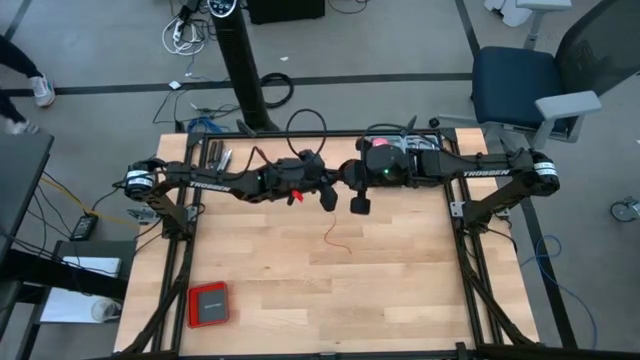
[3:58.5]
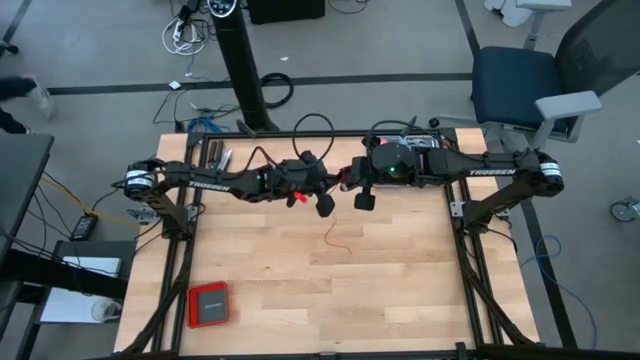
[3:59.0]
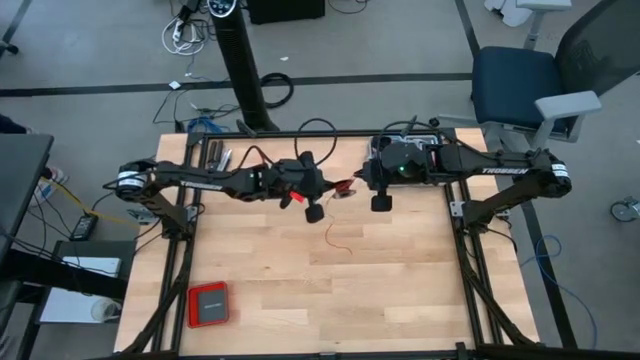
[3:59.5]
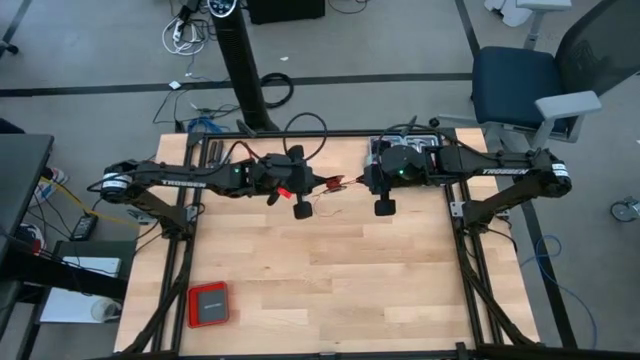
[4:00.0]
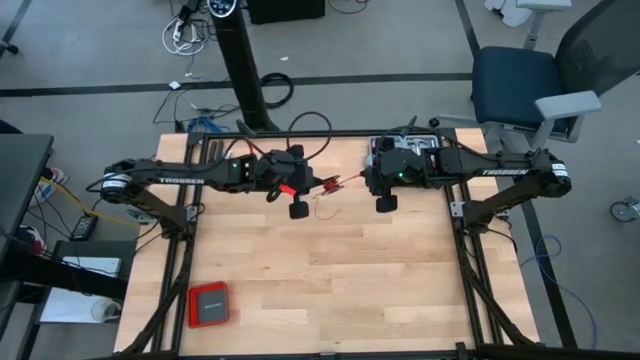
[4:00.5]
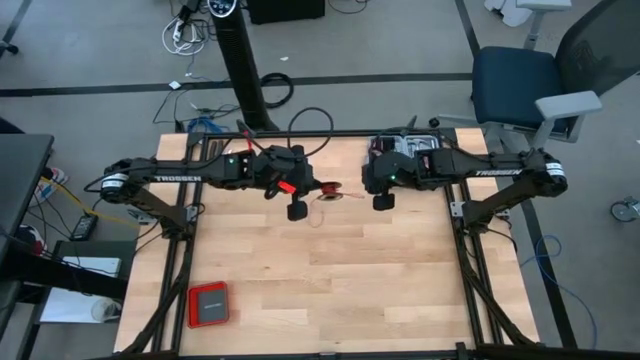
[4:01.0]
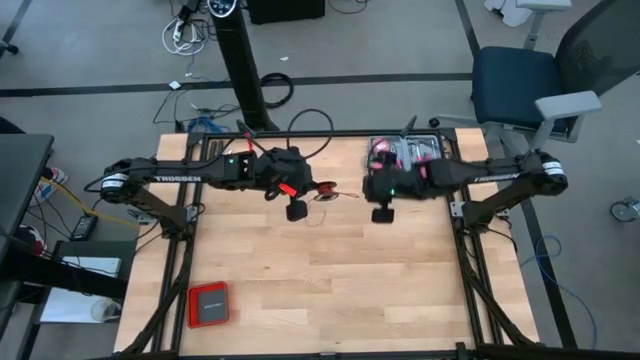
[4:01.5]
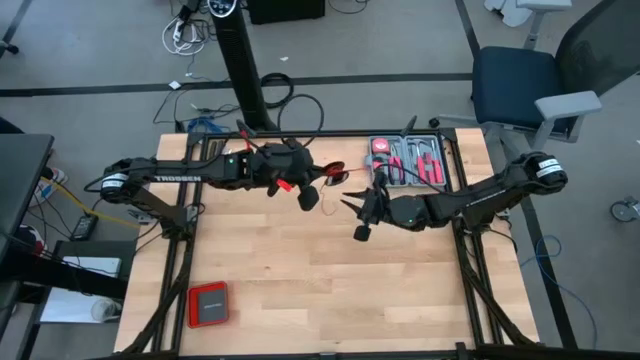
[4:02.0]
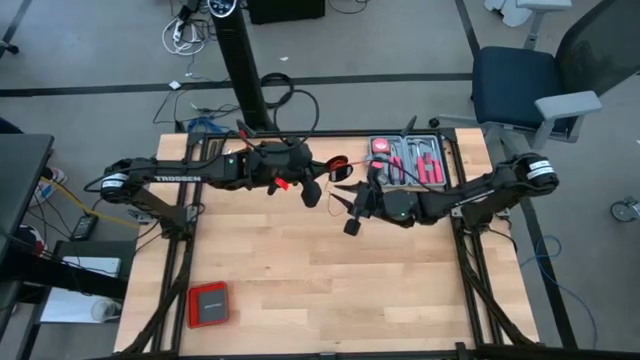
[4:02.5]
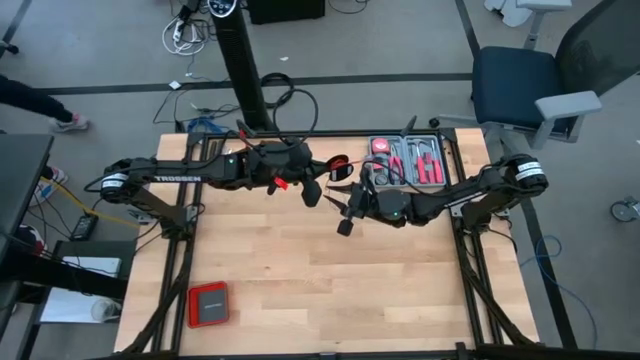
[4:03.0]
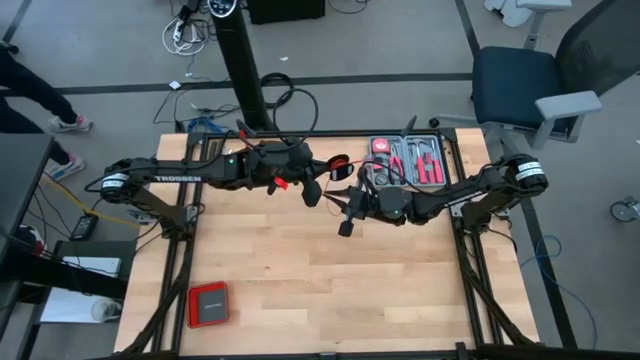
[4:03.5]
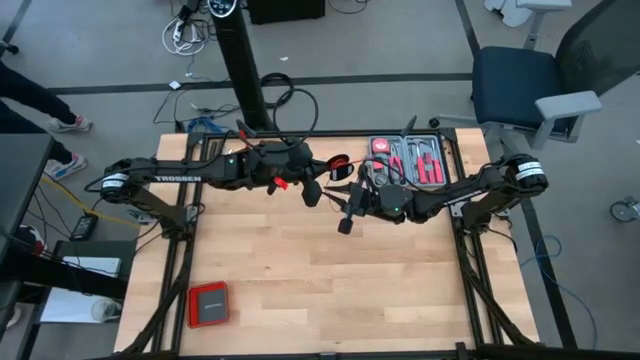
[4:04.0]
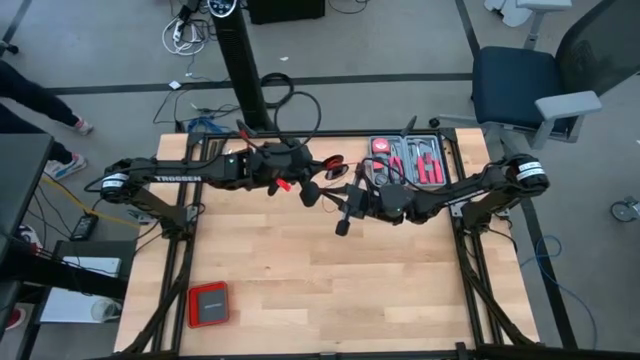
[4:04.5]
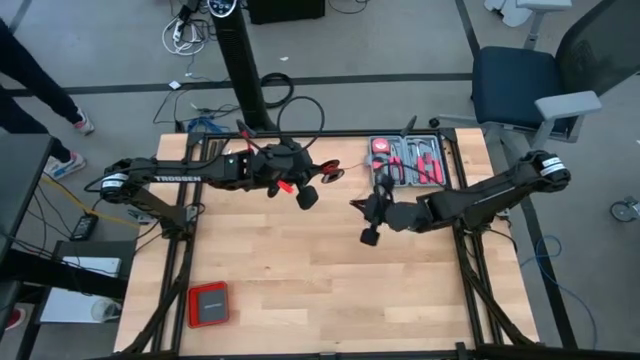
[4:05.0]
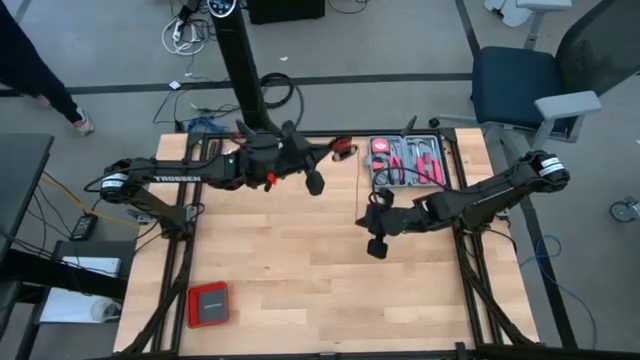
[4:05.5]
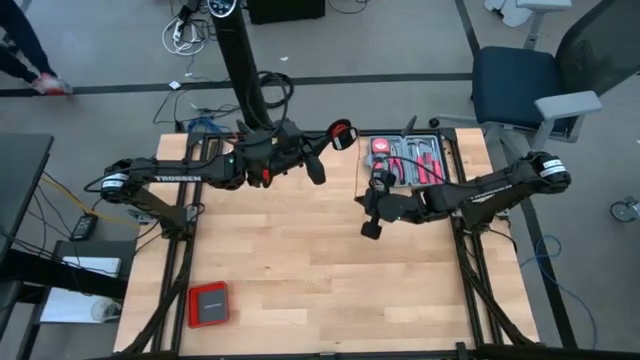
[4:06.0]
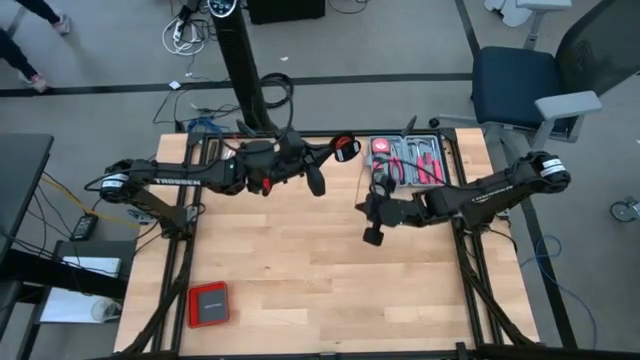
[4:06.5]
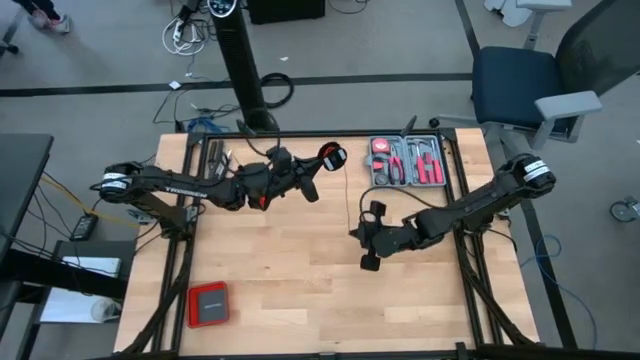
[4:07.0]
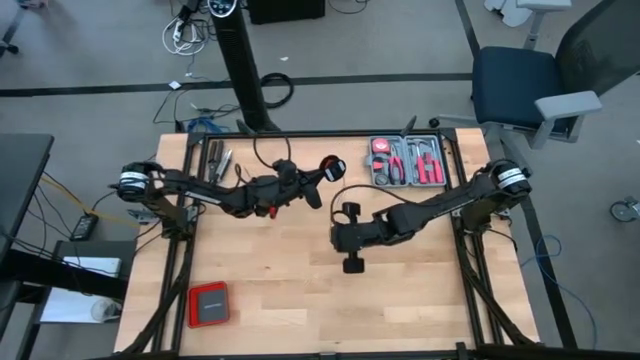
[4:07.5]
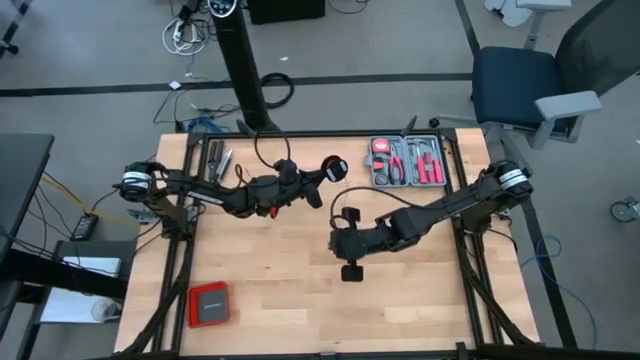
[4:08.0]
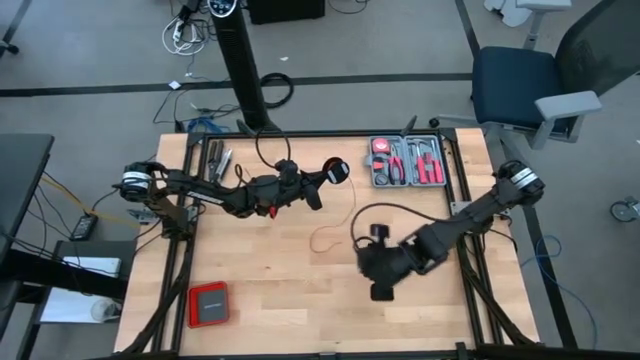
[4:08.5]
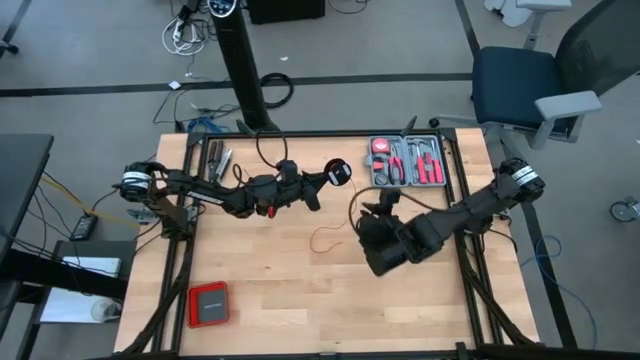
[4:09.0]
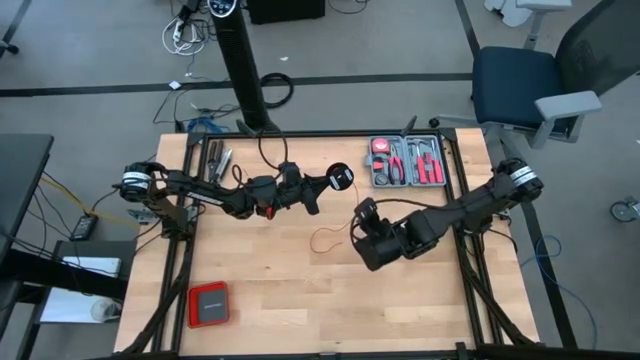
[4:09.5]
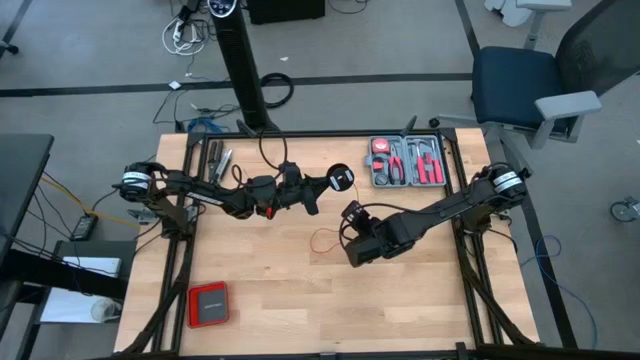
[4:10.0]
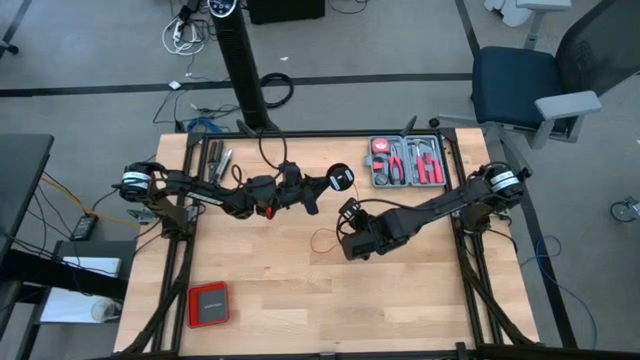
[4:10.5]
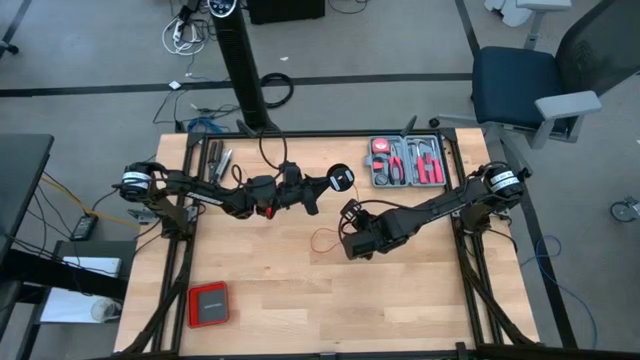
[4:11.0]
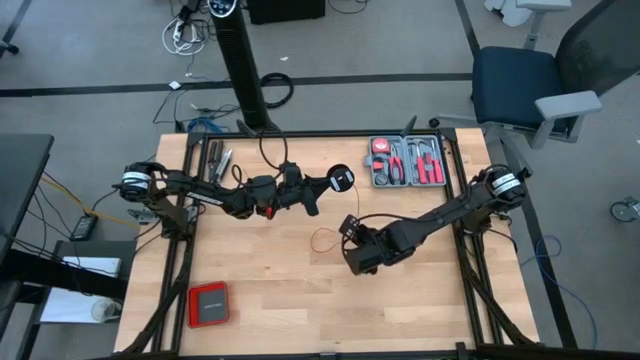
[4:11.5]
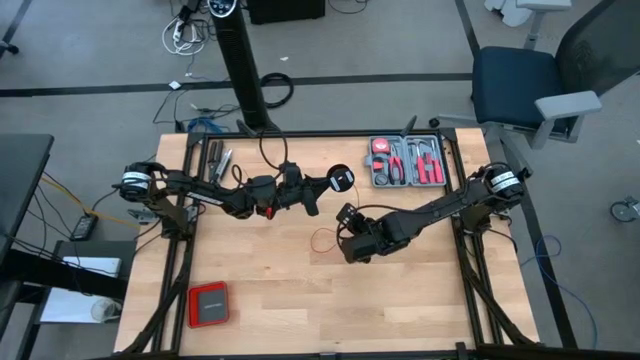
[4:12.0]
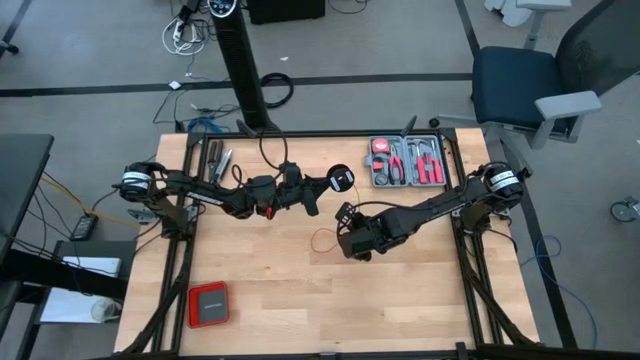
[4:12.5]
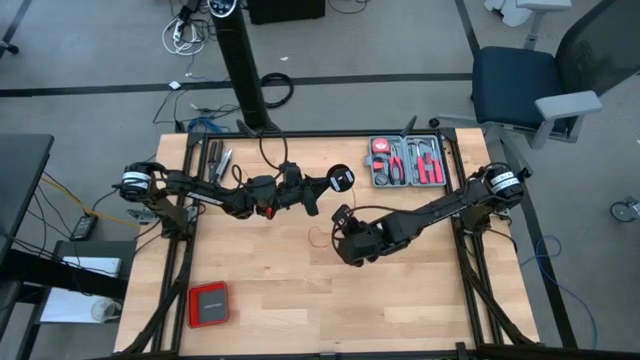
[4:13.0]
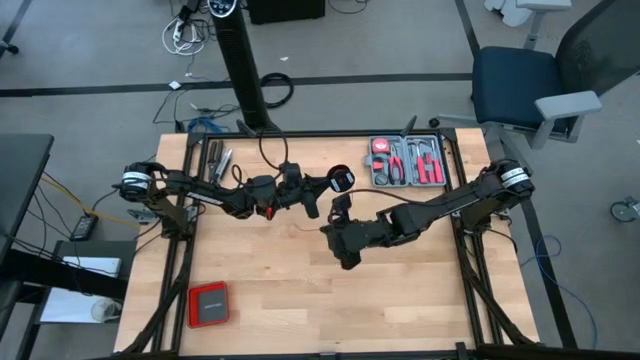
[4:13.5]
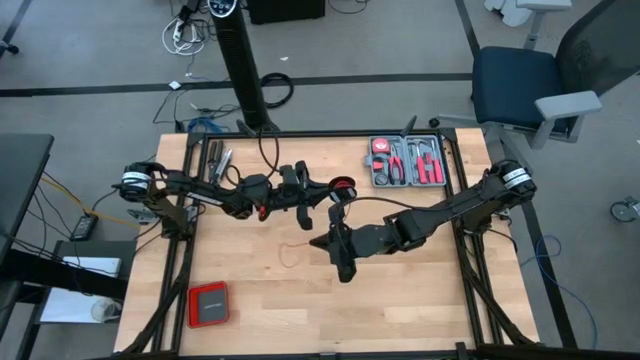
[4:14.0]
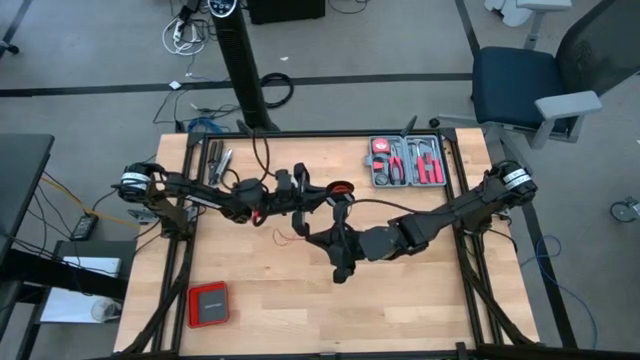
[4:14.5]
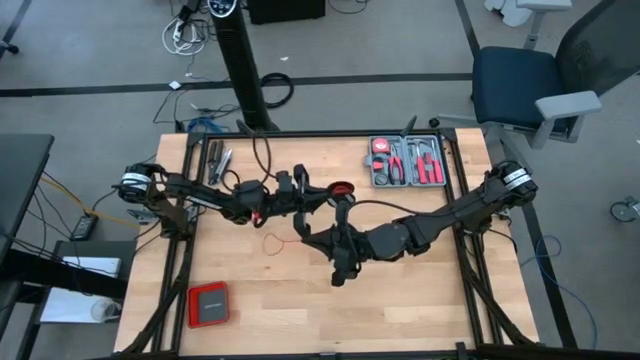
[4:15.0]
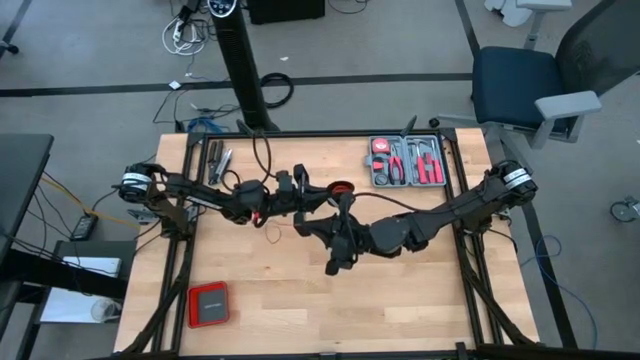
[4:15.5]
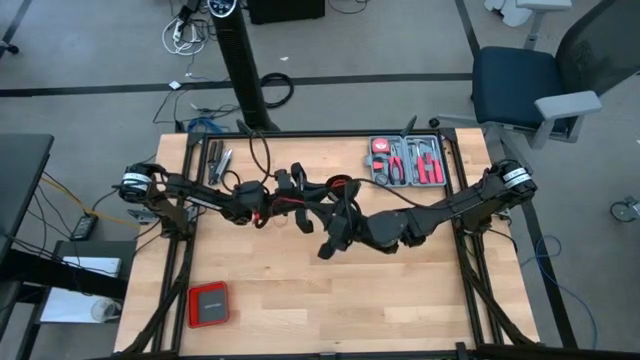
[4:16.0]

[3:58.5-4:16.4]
Task: Coil cords
Coil the red cable wire onto the black spool

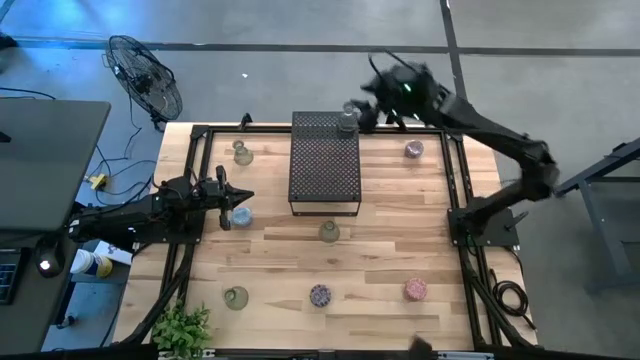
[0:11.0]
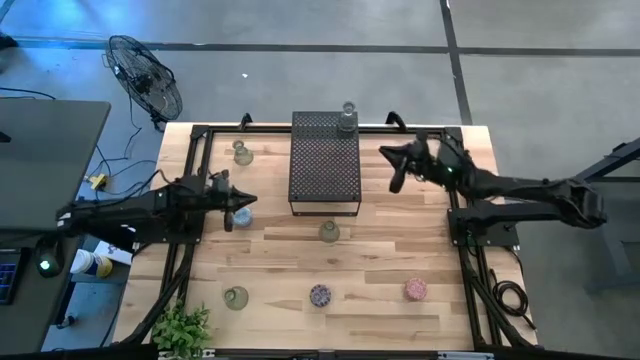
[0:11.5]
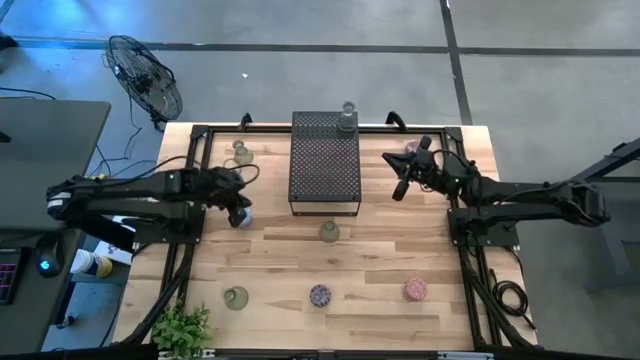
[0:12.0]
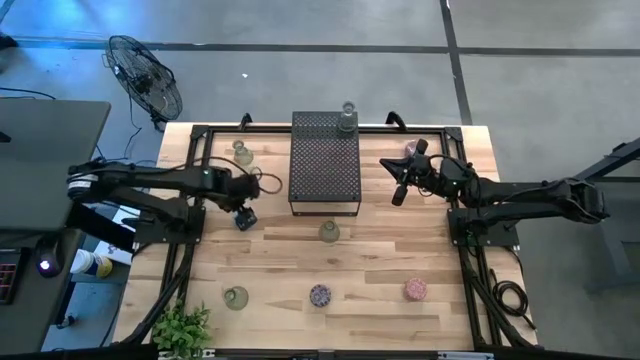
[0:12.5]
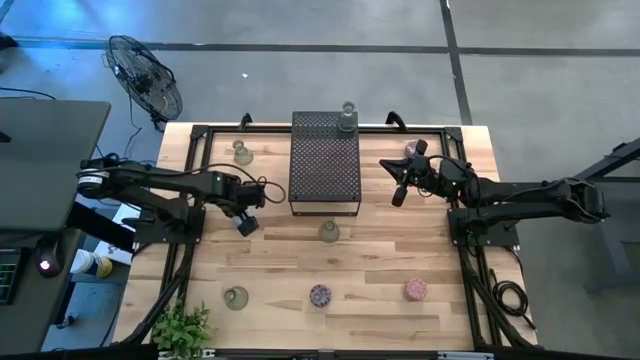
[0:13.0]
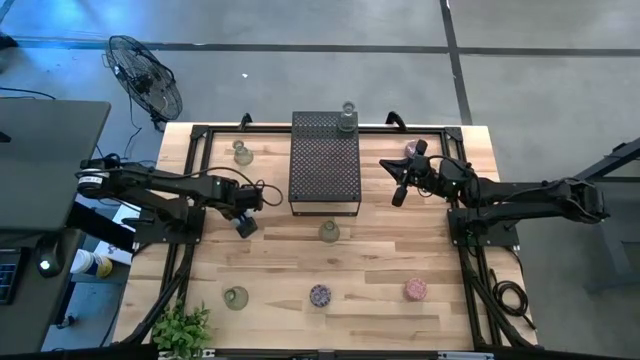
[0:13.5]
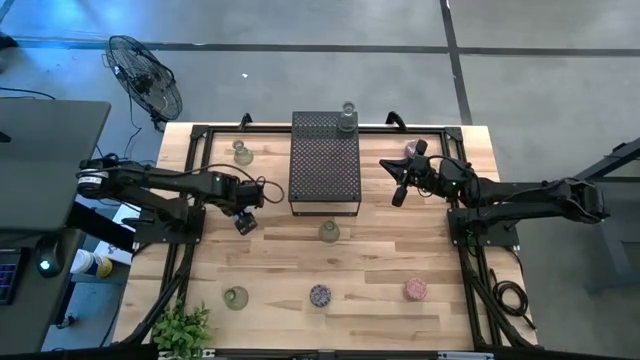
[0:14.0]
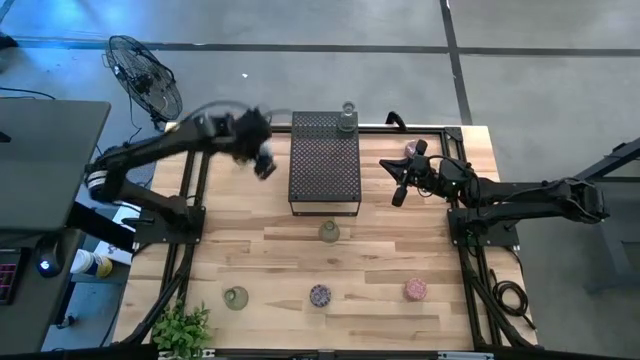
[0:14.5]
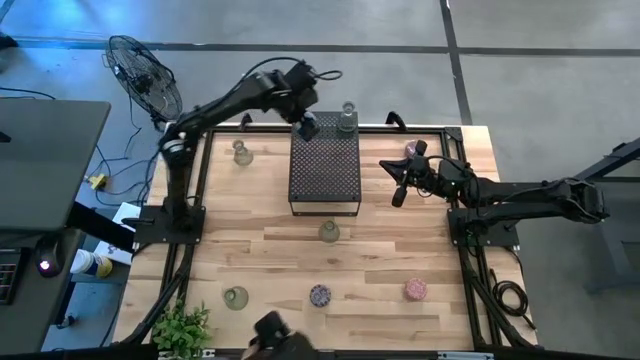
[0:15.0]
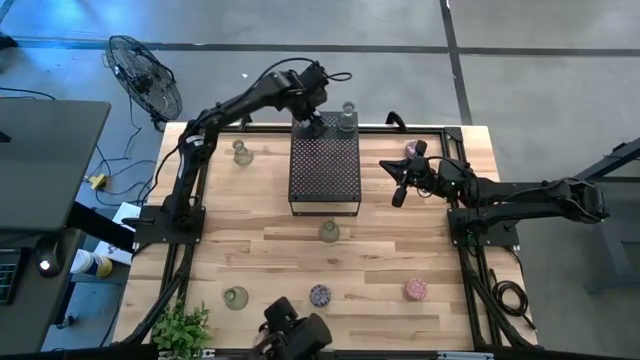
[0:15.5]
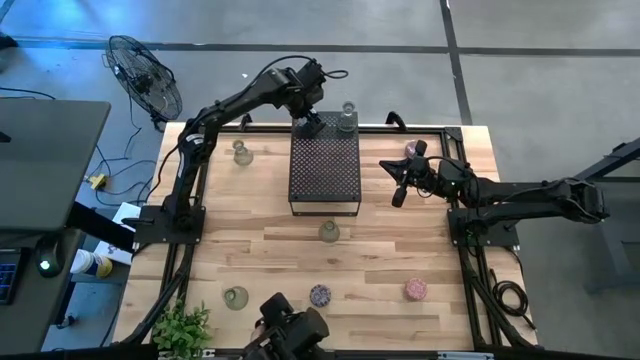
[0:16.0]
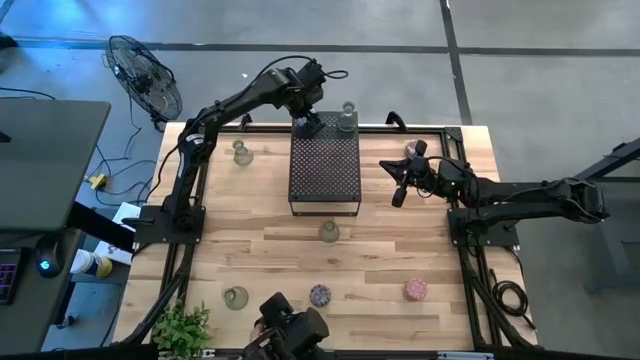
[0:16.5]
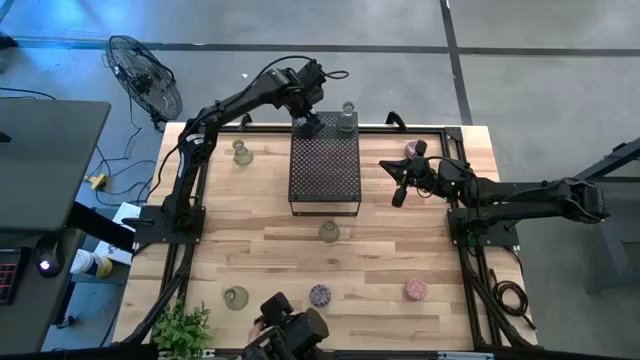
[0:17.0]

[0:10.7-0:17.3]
Task: Pick & Place candle stick holders
Put the blue scented candle on the of the shelf
